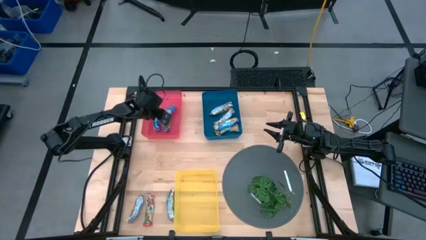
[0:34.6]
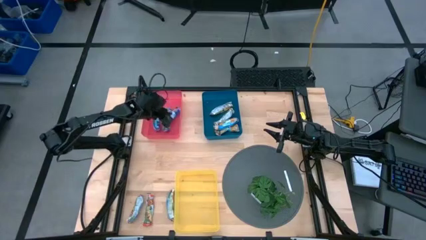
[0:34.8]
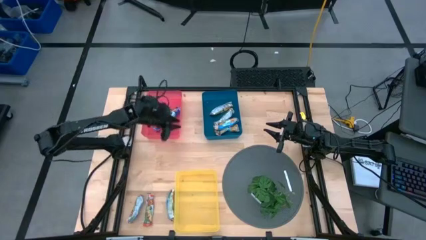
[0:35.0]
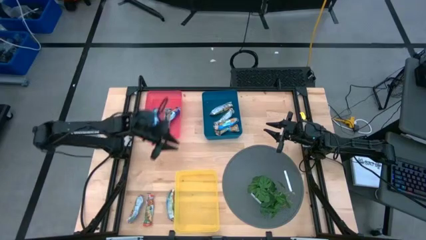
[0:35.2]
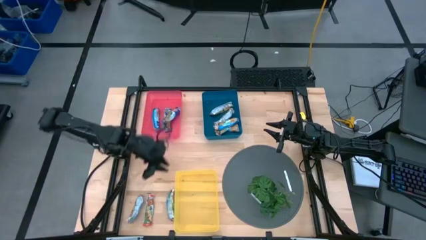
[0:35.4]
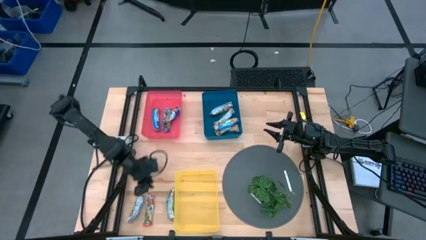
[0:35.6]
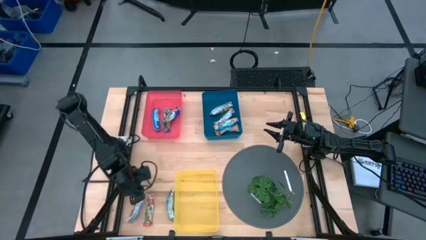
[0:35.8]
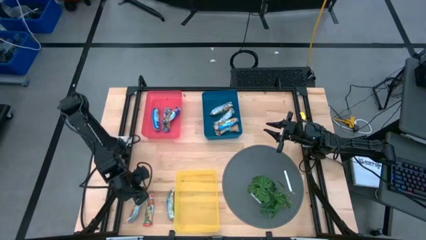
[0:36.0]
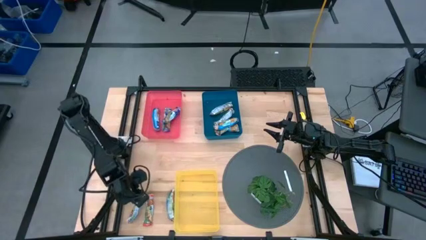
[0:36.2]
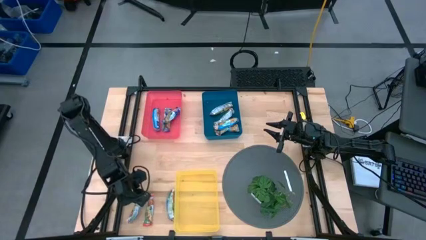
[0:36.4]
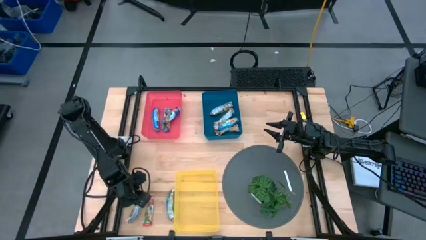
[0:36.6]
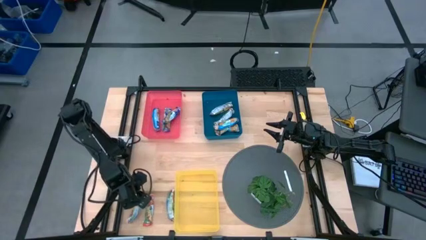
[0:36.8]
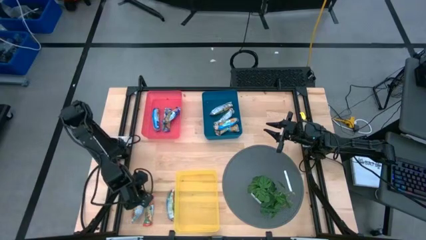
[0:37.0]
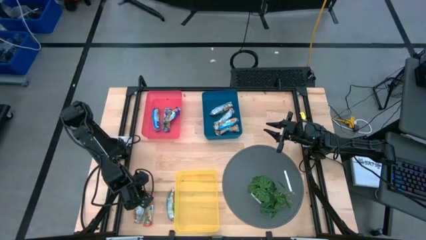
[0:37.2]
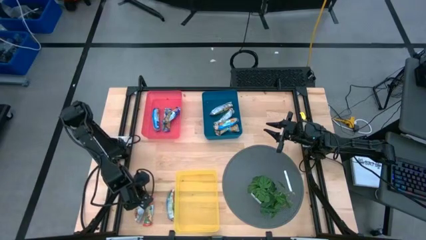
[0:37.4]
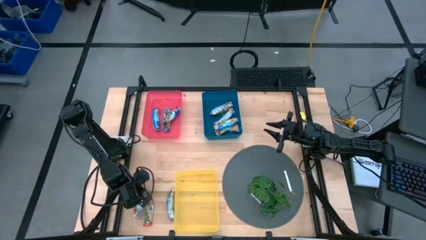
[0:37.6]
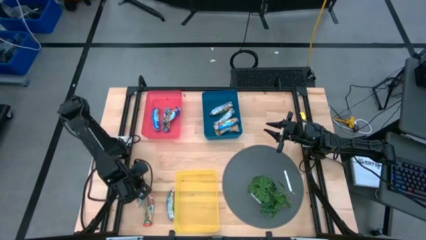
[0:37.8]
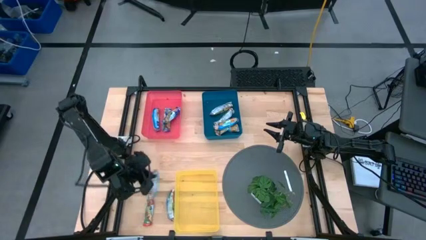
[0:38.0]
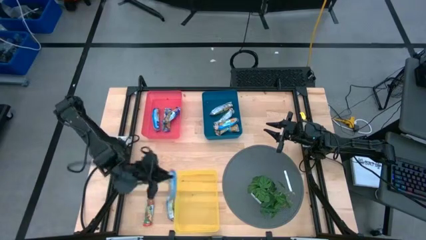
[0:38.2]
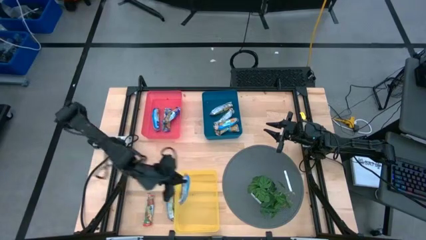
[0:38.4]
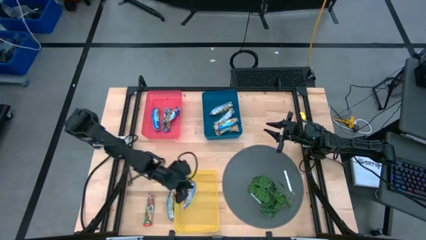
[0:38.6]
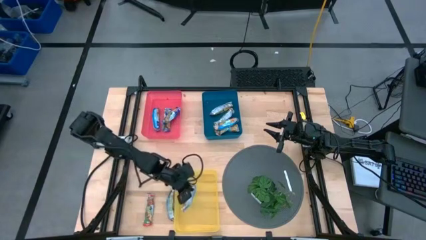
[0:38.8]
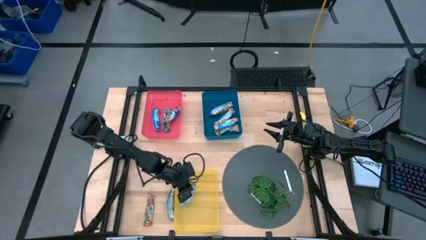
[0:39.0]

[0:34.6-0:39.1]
Task: Pick and place Granola Bars by type
Put the left red granola bar into the yellow bin

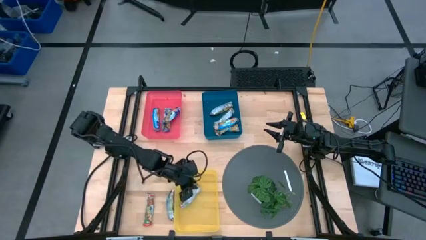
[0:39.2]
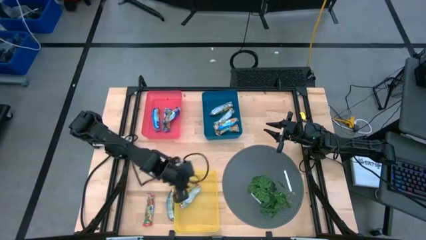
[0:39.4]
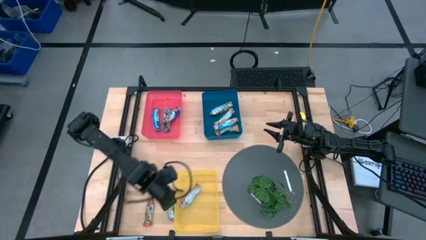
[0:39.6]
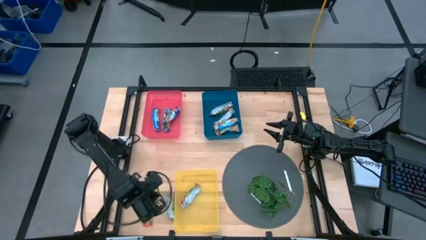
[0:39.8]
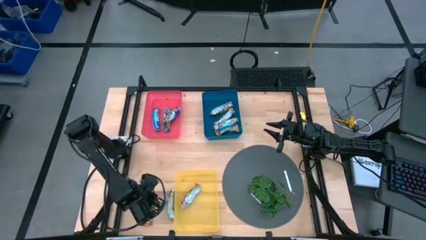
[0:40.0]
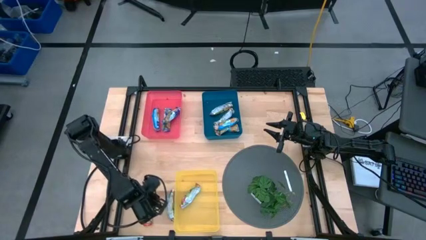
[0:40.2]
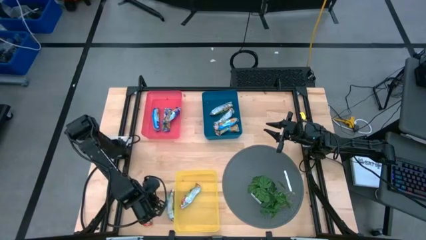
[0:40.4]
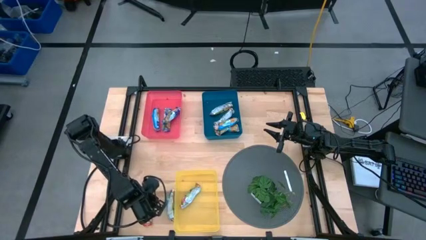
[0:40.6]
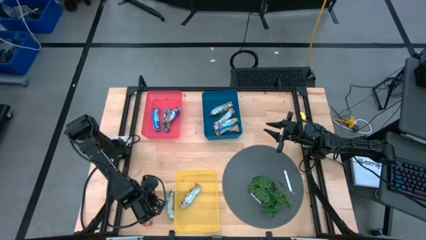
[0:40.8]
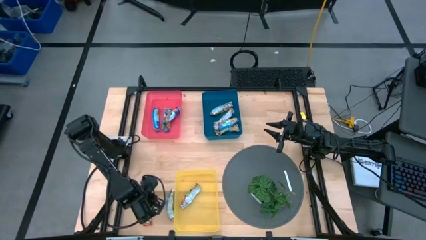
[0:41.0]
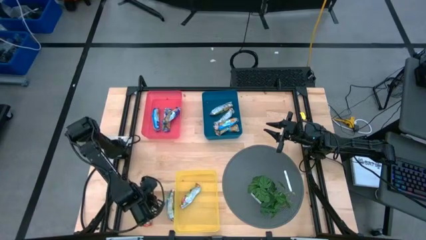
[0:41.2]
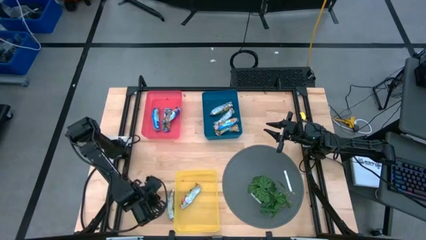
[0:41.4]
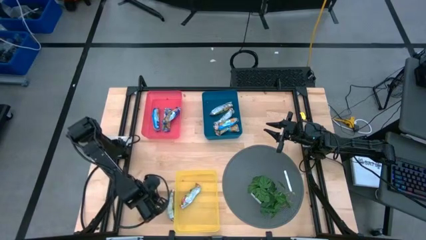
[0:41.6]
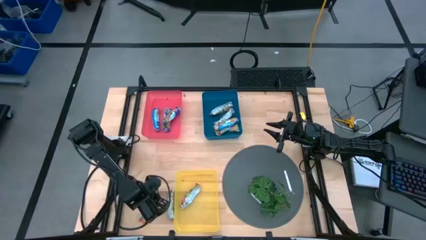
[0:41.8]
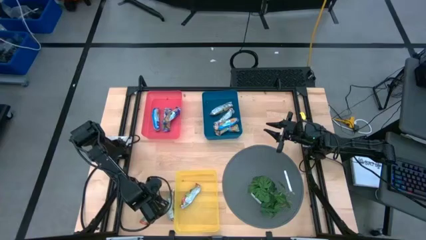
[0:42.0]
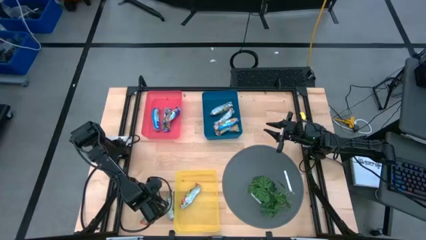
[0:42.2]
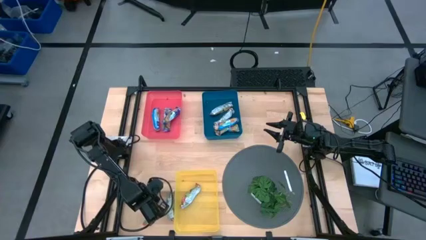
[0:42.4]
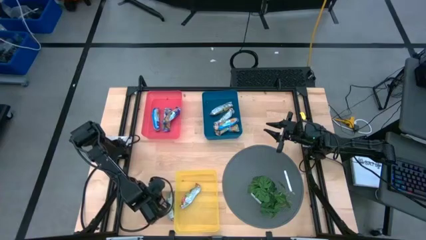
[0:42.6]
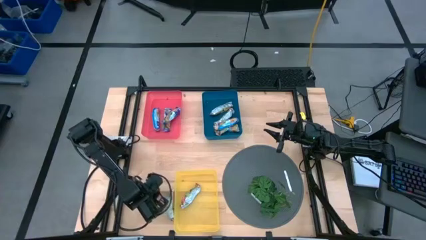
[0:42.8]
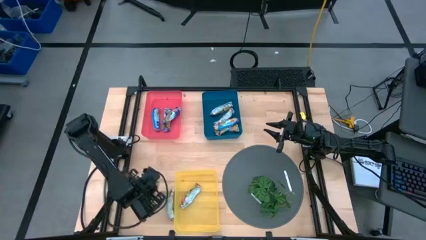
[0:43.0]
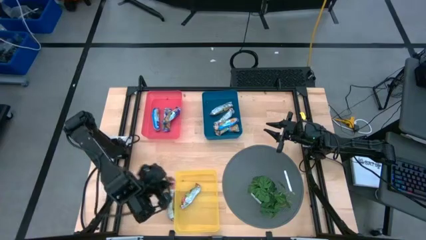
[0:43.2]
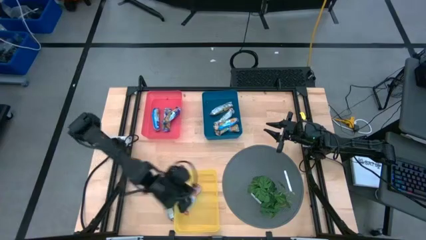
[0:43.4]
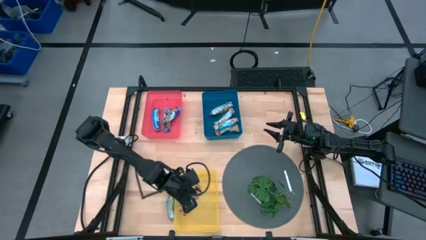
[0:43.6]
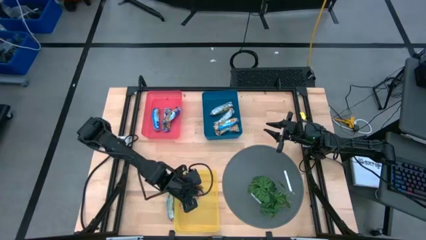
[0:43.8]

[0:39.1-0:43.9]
Put the left red granola bar into the yellow bin

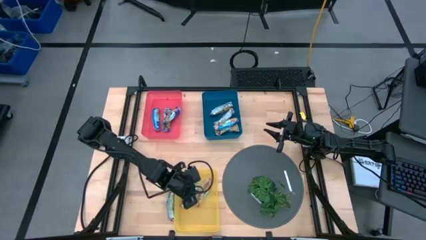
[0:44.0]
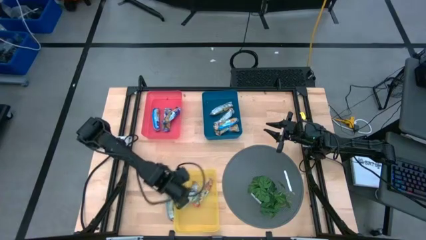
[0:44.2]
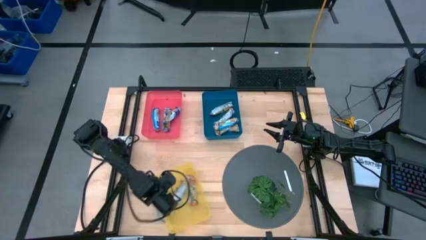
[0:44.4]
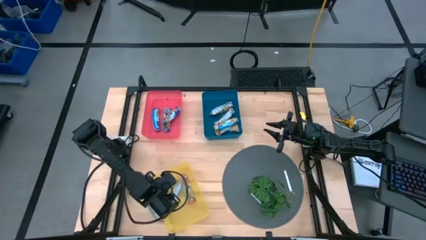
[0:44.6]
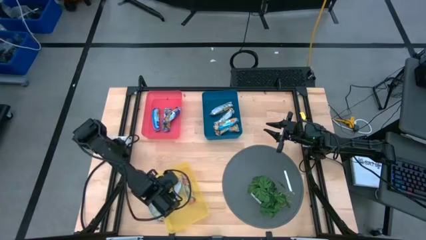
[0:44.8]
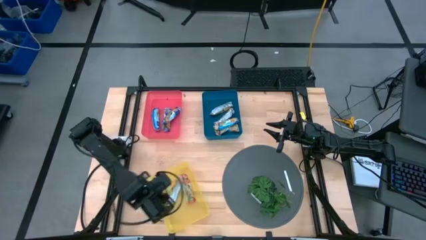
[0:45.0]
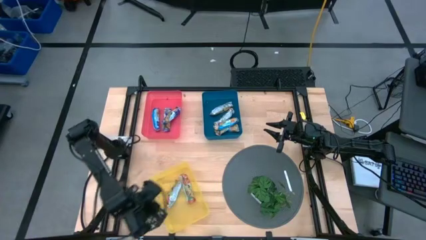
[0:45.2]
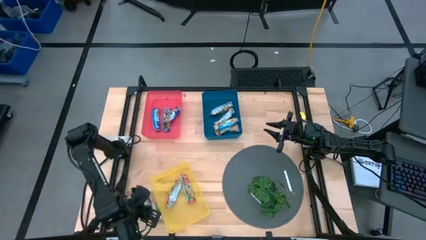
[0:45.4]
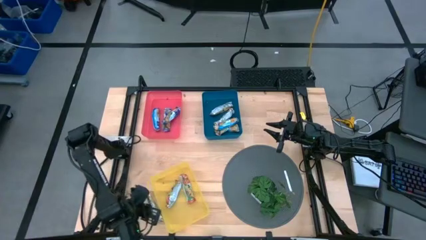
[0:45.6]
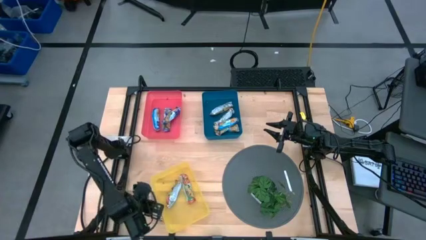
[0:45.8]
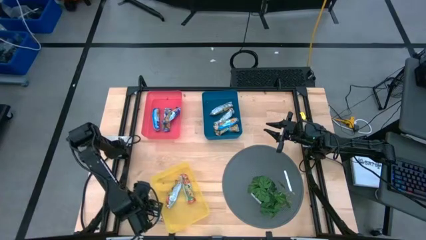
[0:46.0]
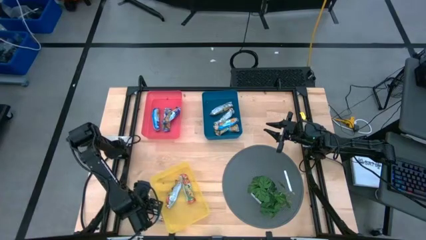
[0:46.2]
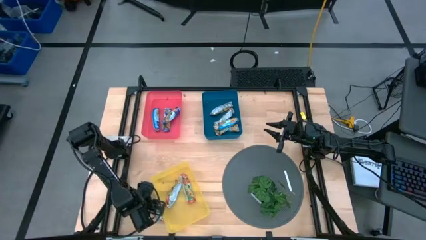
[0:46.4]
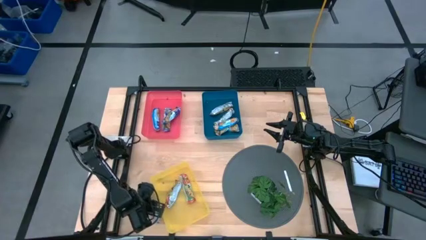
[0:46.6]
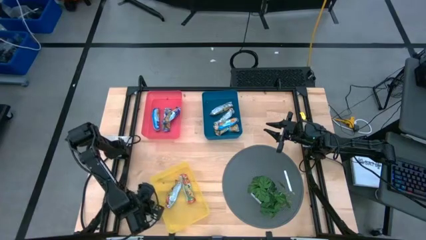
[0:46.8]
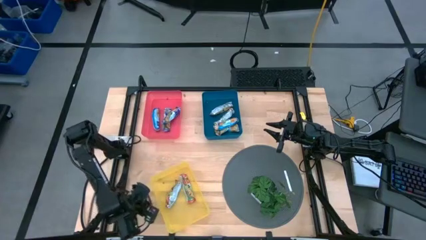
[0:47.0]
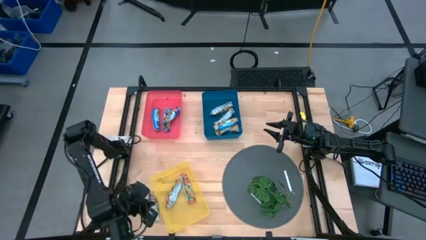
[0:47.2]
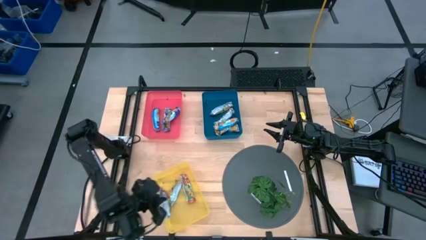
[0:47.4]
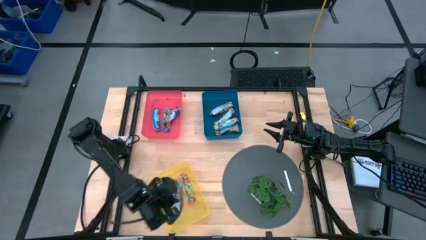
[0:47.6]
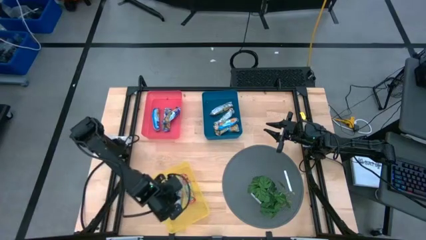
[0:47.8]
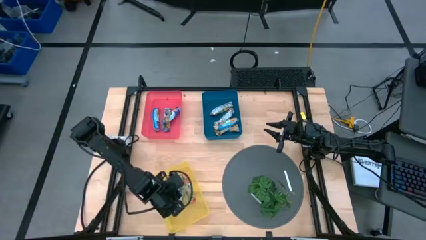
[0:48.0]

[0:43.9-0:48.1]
Put the red granola bar into the yellow bin

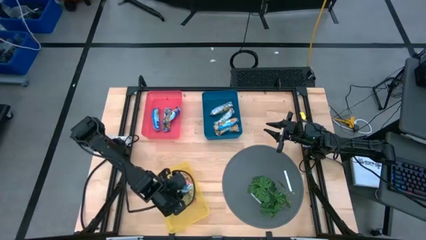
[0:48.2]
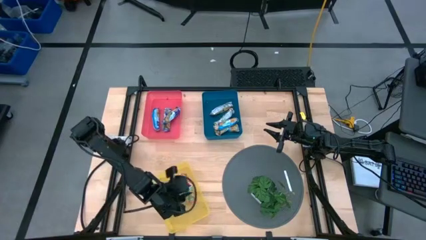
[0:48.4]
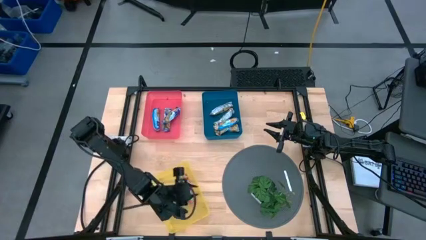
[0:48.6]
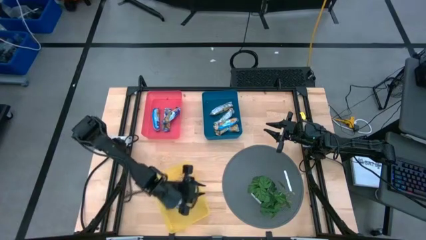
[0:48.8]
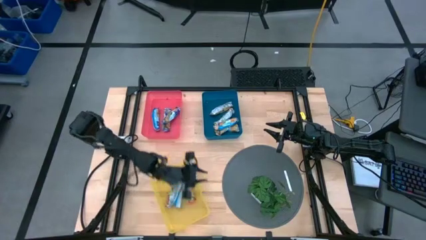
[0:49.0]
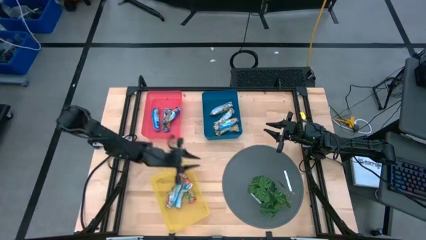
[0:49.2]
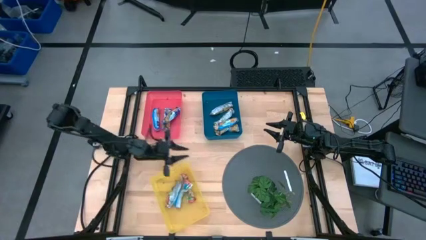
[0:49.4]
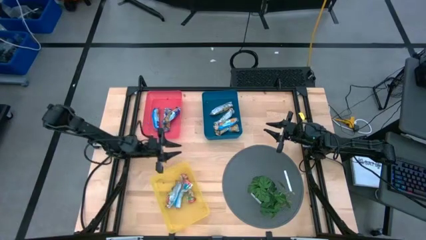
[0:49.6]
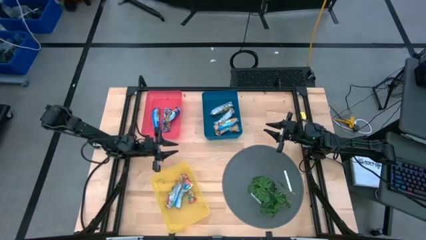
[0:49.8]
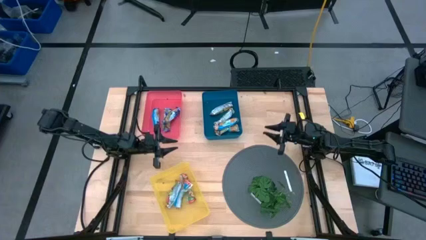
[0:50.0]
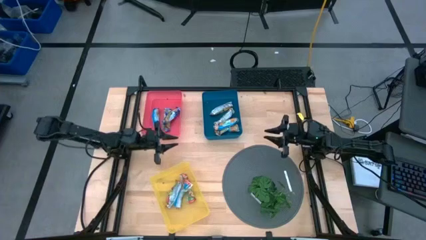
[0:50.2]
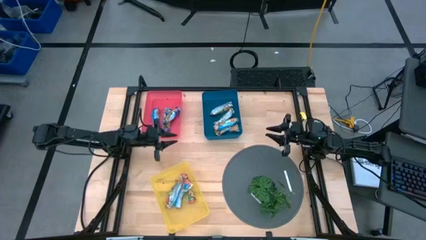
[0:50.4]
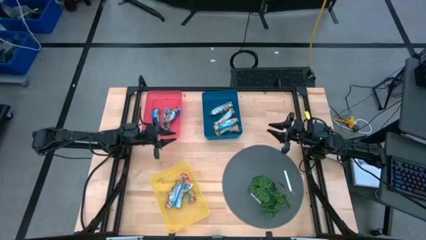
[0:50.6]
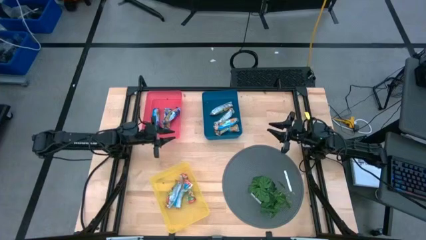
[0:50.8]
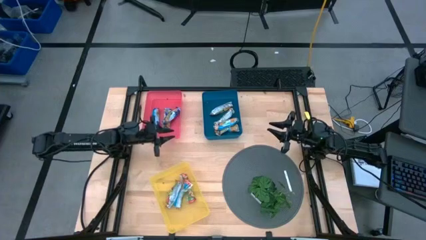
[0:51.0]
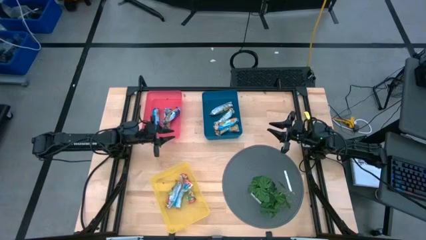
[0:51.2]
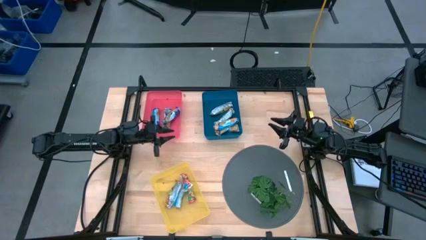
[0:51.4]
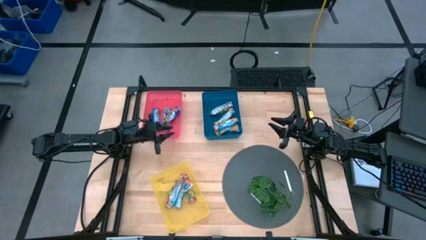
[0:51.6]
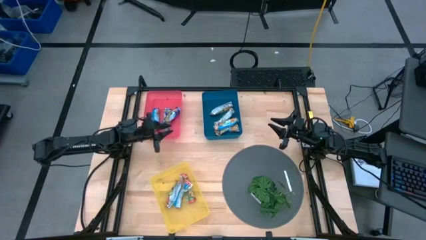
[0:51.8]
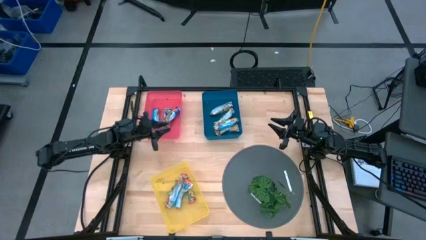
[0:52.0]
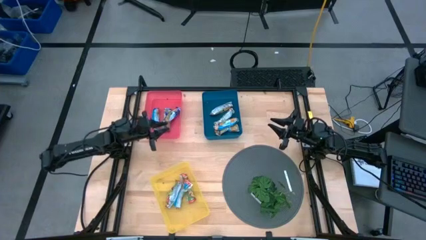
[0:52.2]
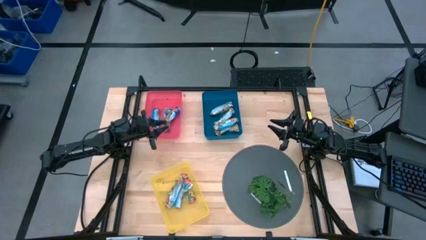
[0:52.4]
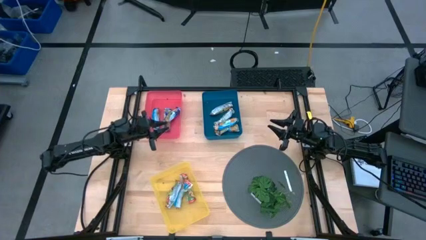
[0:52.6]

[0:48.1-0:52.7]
Return to Home Position
